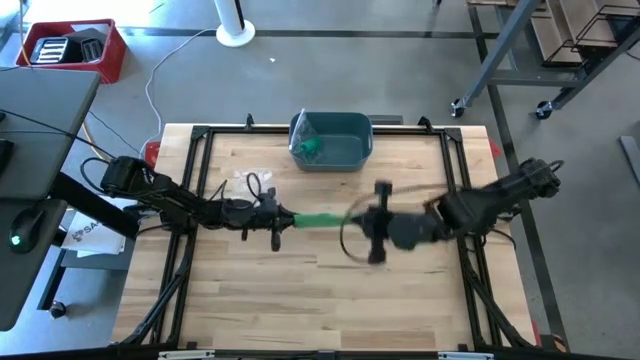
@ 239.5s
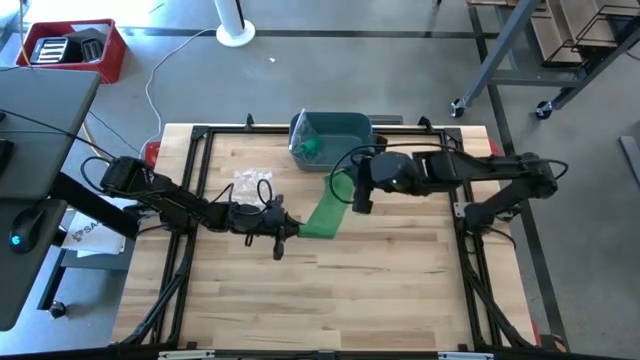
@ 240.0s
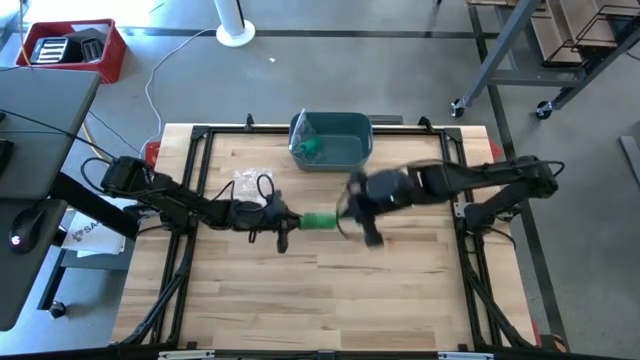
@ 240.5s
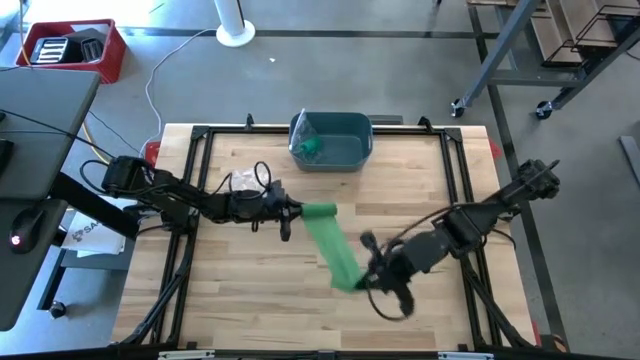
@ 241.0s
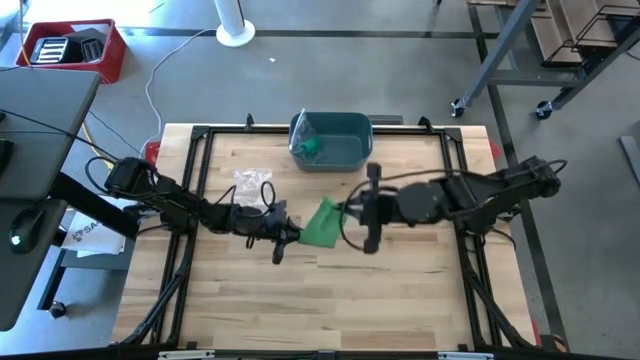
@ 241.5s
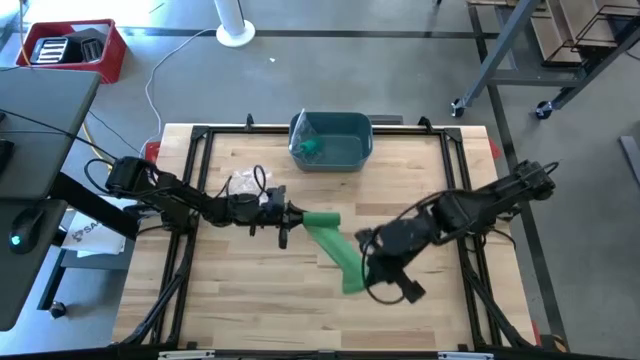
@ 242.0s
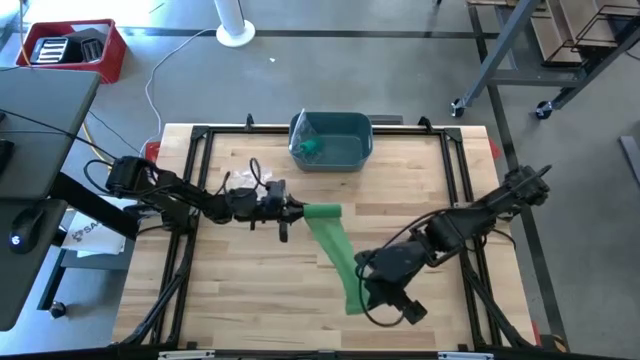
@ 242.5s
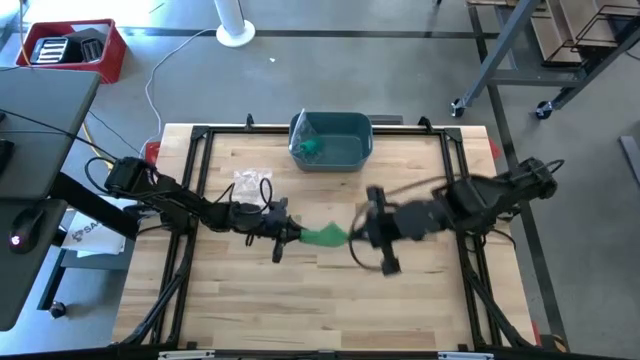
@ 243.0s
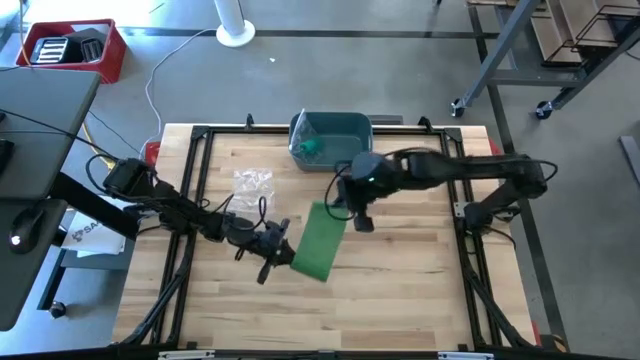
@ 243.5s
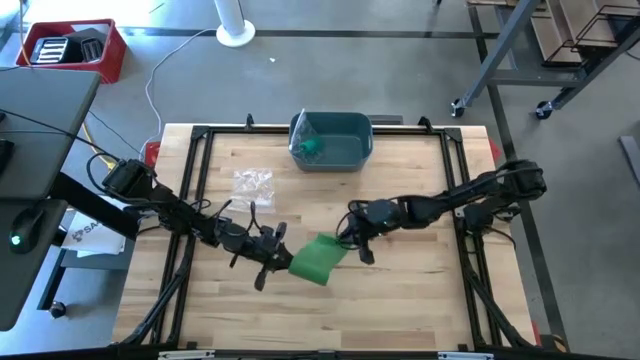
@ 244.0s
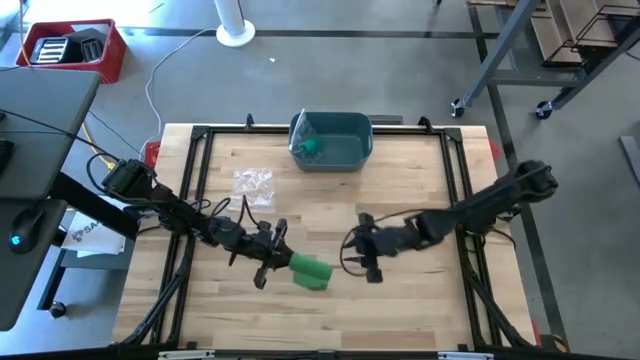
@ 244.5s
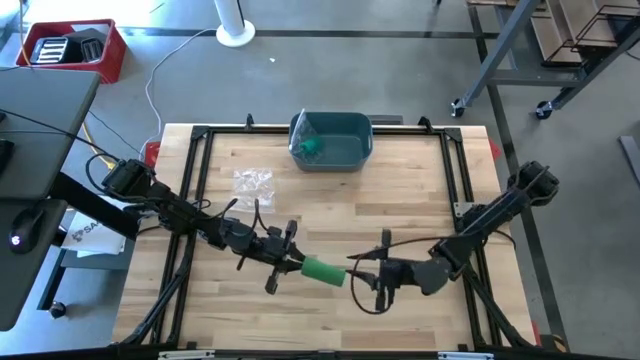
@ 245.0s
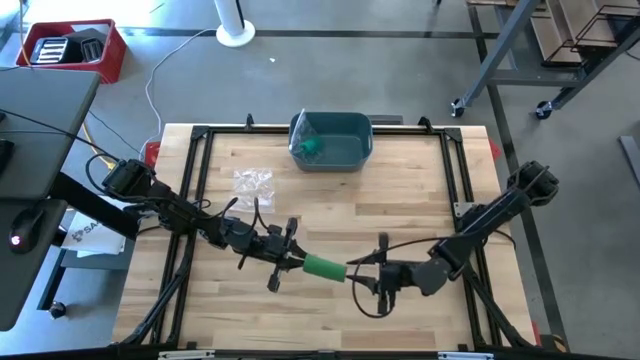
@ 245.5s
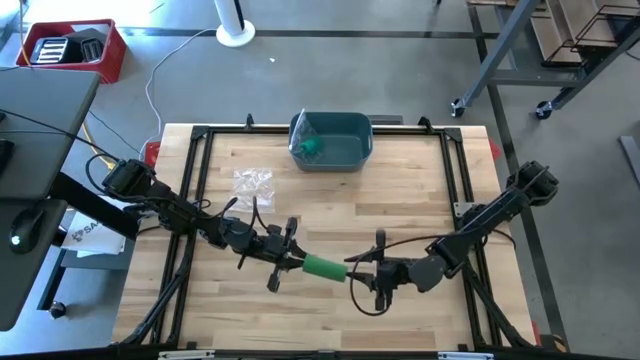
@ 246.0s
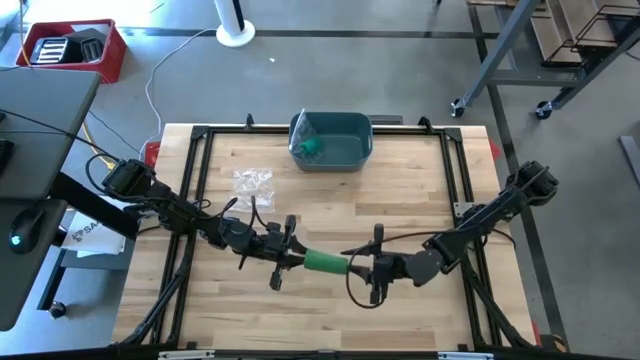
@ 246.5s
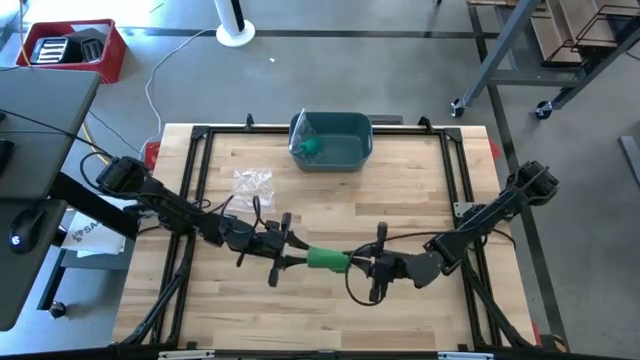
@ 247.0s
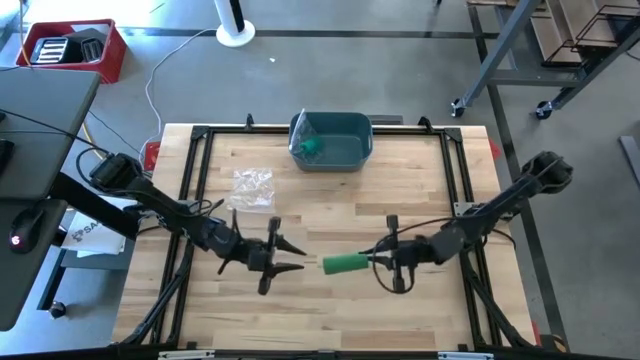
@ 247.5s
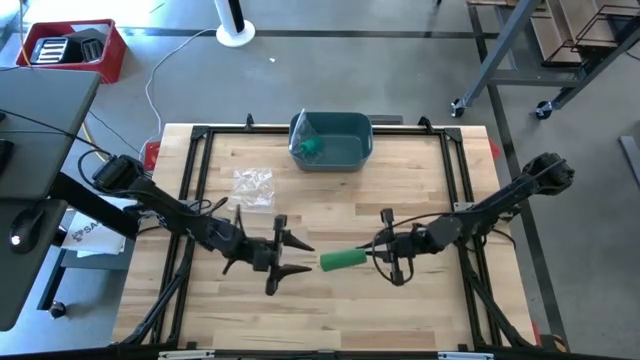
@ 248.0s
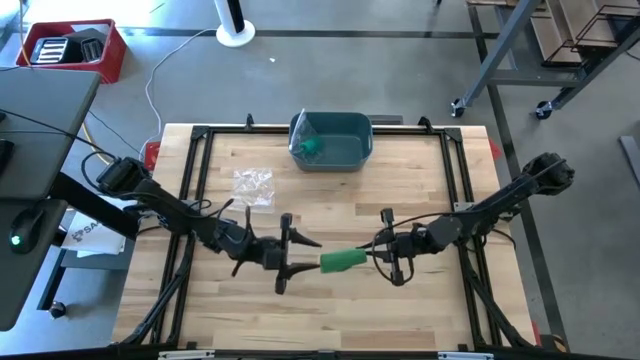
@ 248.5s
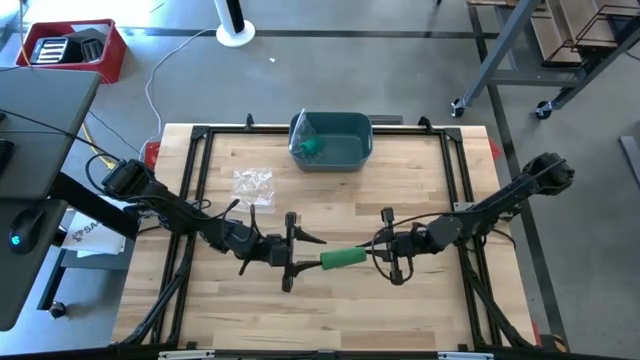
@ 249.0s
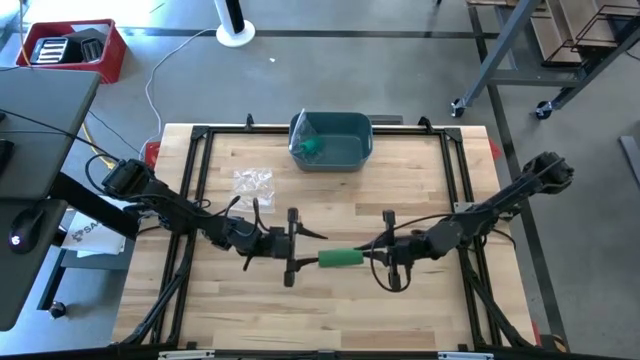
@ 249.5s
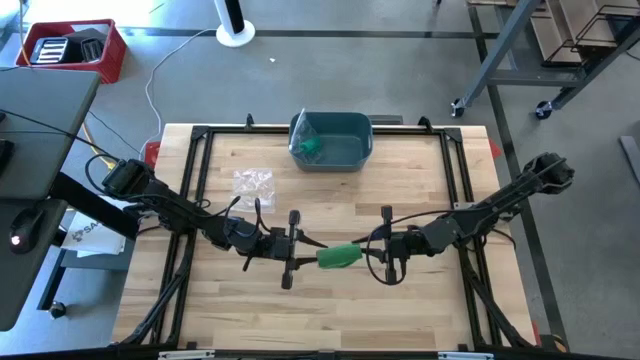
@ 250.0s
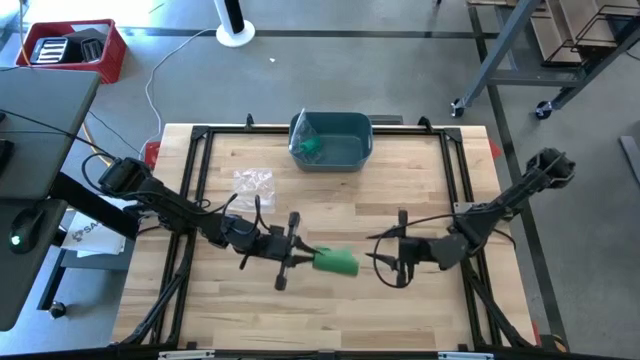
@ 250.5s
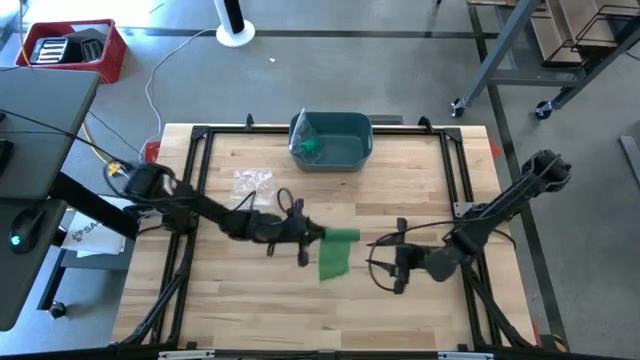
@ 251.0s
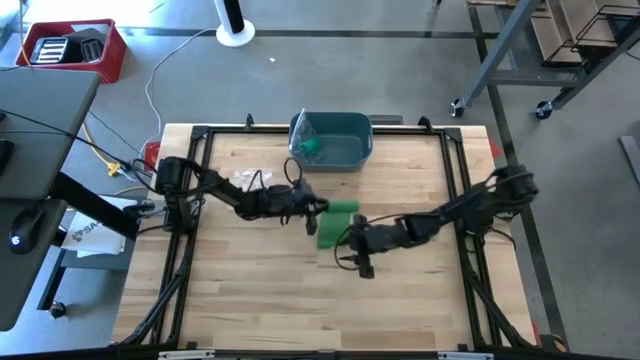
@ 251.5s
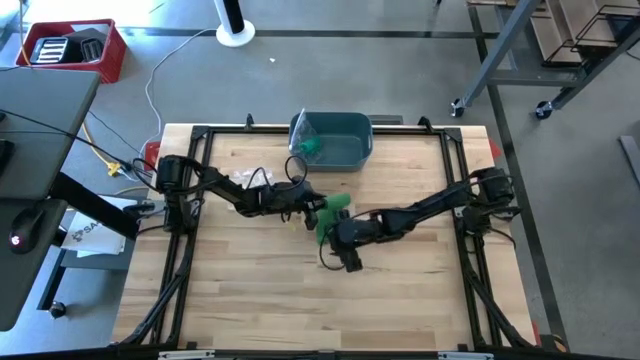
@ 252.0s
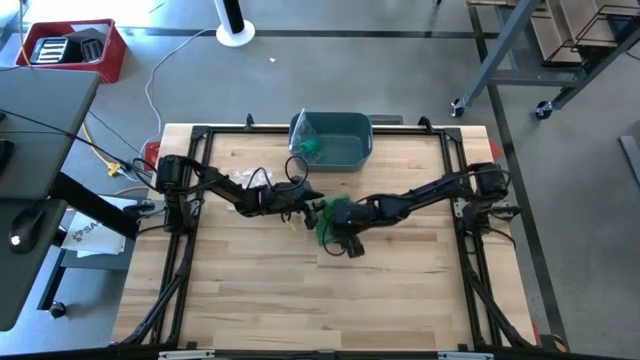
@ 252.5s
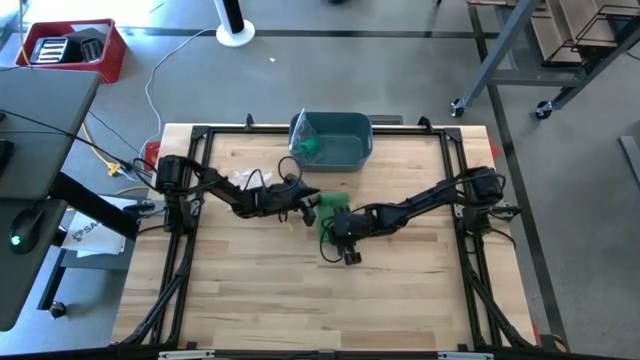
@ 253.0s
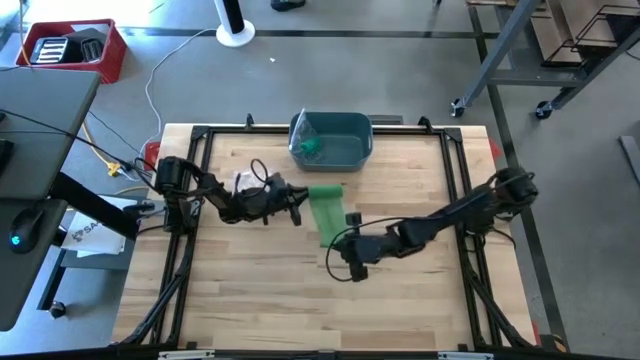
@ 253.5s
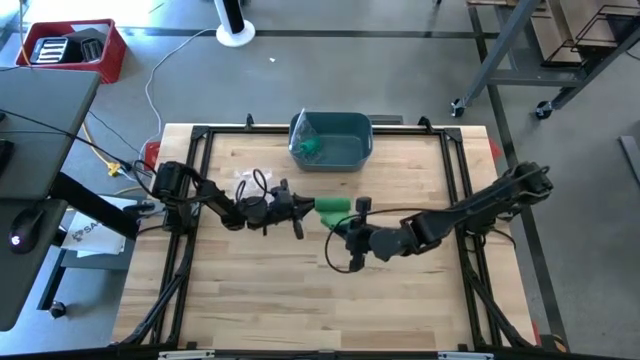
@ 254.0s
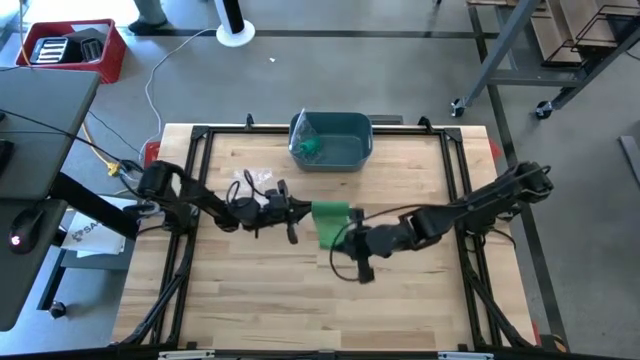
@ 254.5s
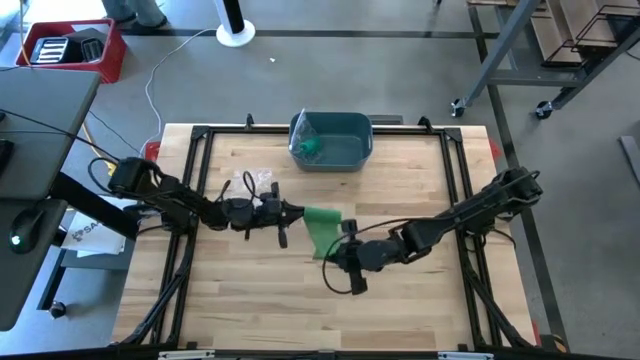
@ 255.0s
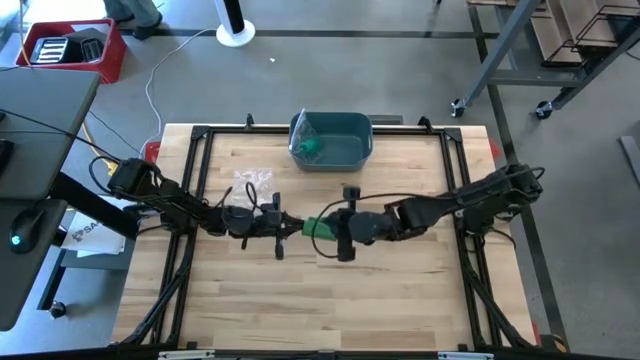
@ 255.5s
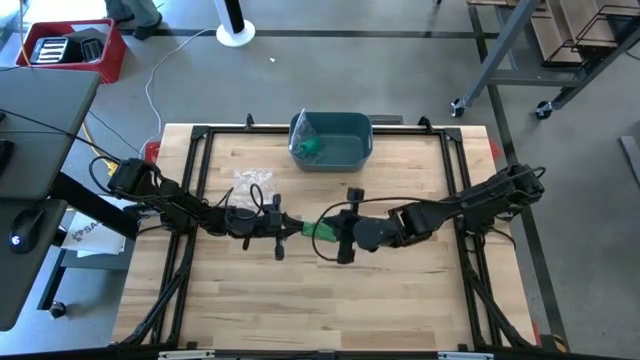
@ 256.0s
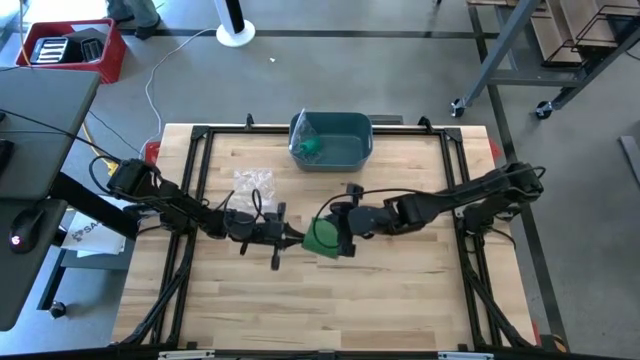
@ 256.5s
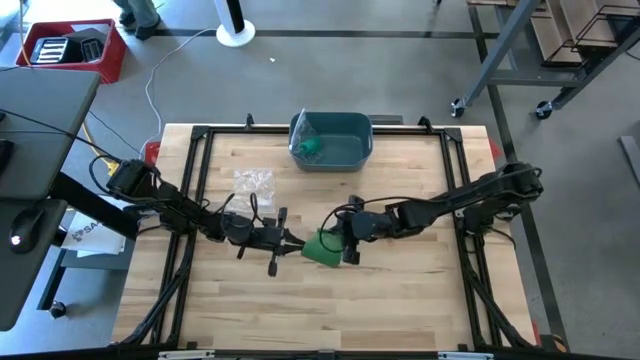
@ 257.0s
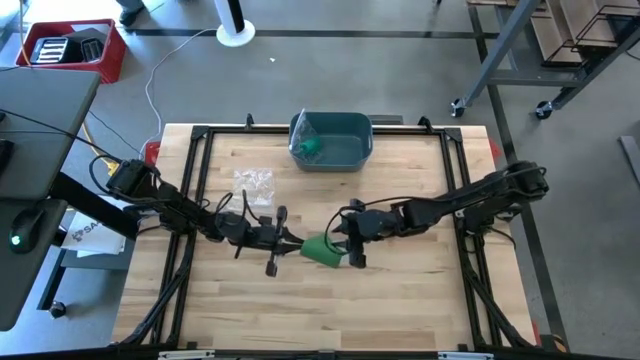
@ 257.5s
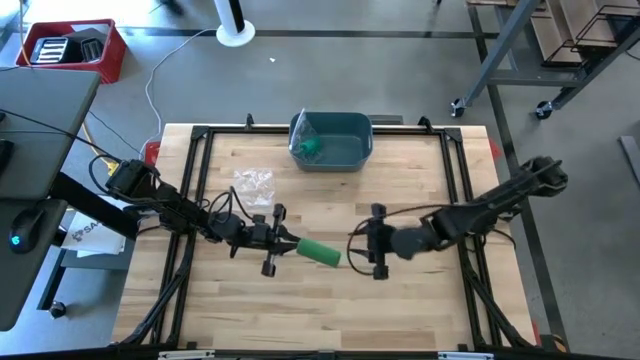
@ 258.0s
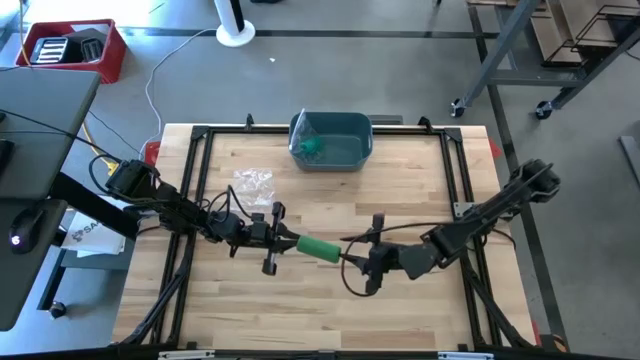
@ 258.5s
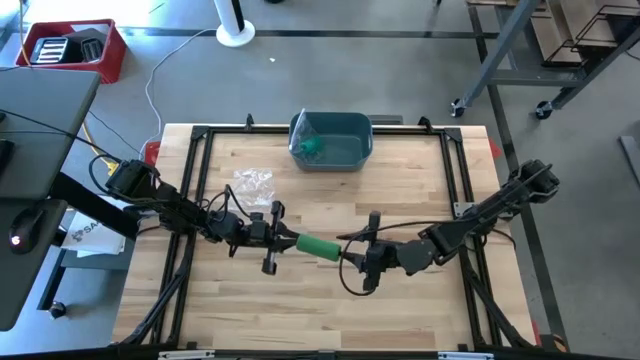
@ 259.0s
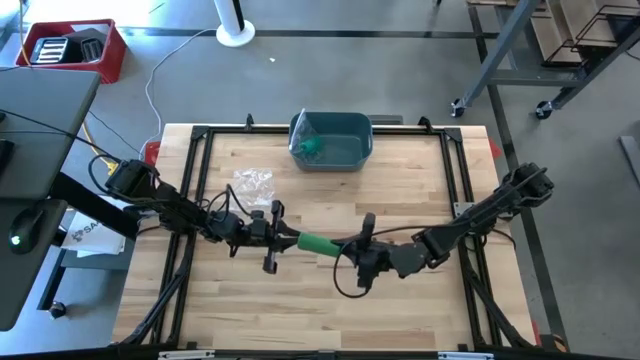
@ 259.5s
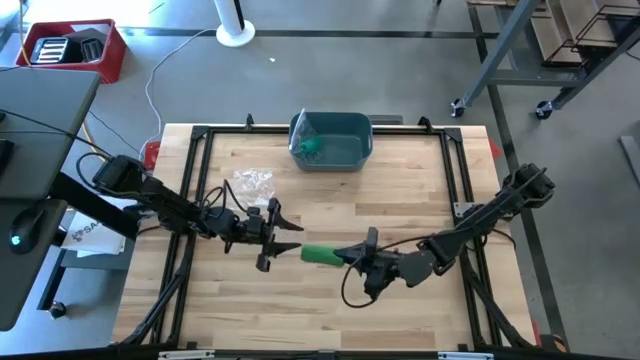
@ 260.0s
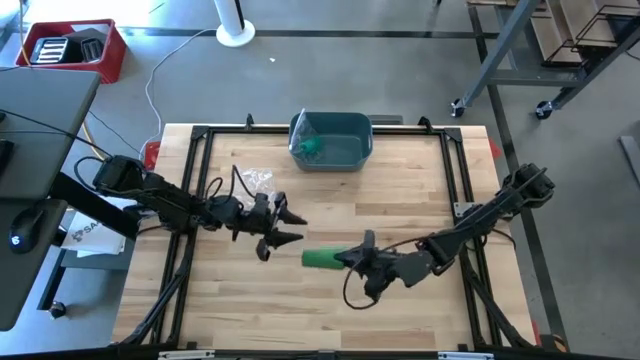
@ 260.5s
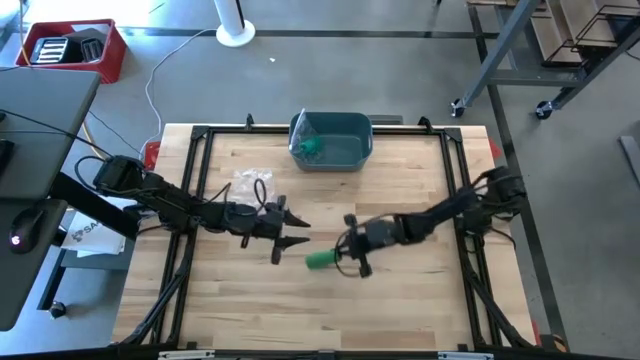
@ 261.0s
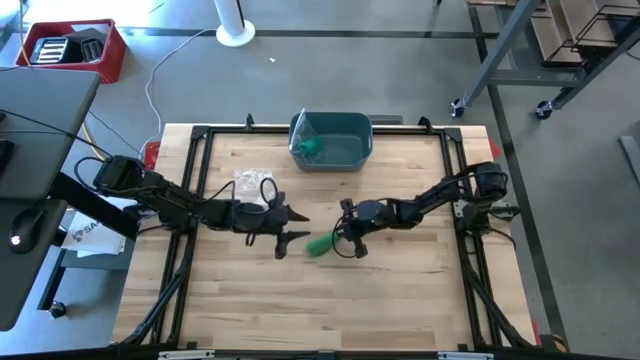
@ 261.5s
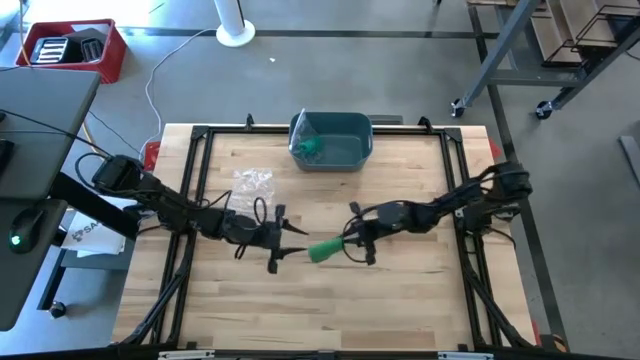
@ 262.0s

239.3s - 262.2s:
Task: Roll bandage
Roll the green bandage
